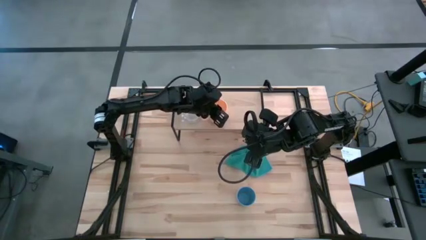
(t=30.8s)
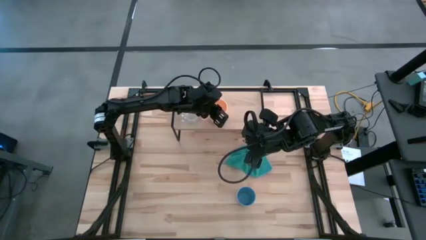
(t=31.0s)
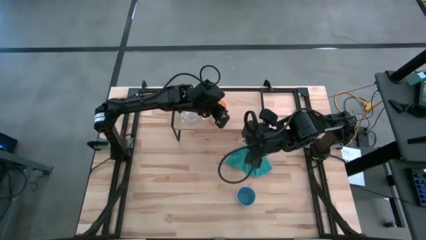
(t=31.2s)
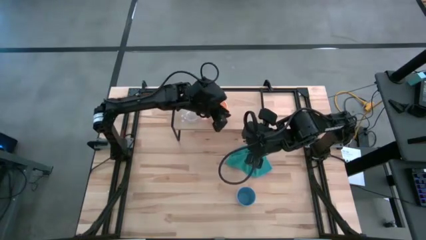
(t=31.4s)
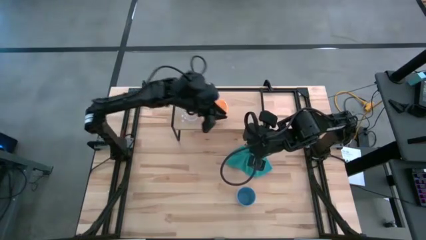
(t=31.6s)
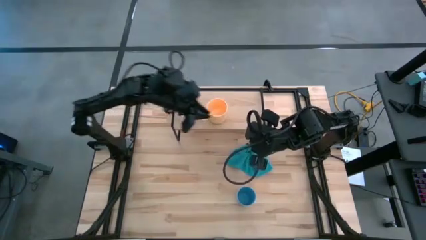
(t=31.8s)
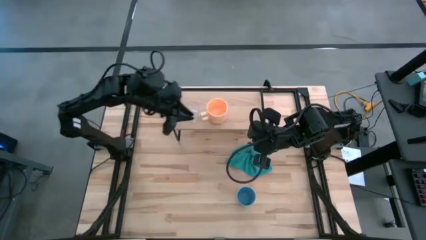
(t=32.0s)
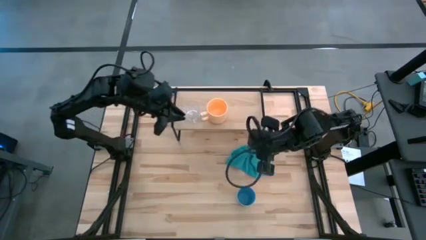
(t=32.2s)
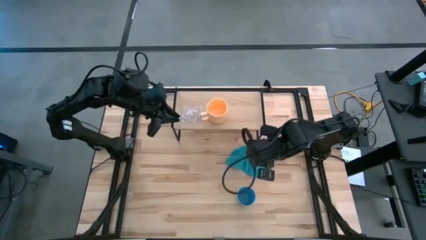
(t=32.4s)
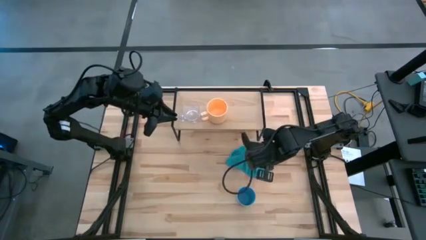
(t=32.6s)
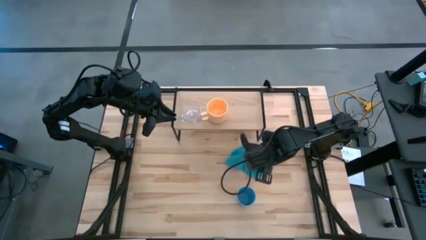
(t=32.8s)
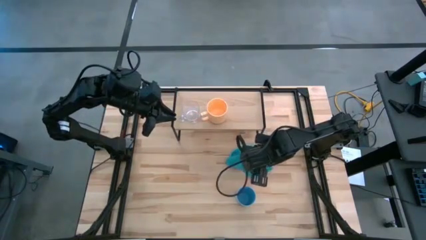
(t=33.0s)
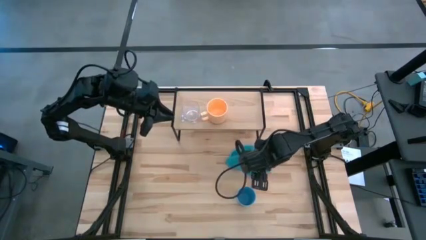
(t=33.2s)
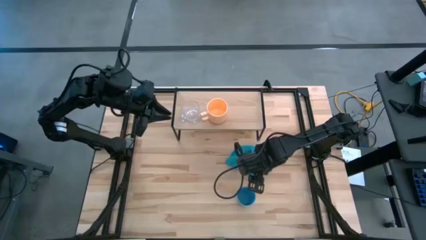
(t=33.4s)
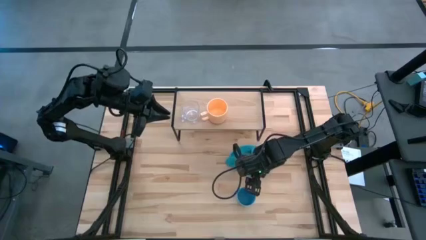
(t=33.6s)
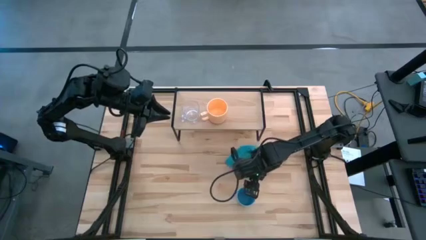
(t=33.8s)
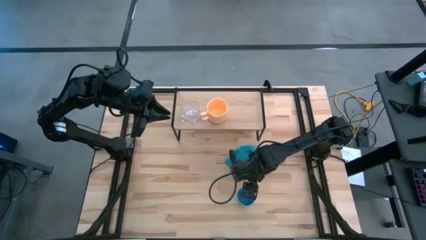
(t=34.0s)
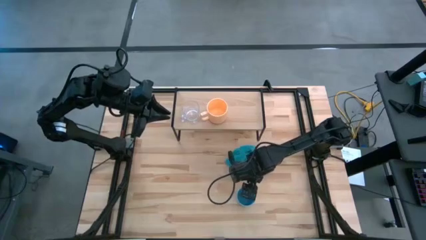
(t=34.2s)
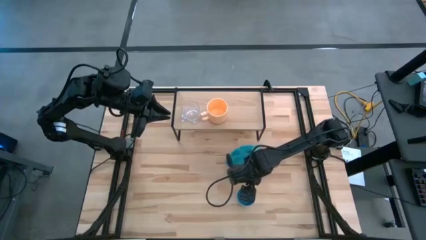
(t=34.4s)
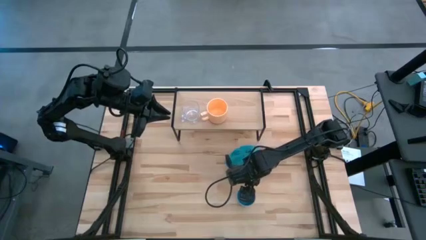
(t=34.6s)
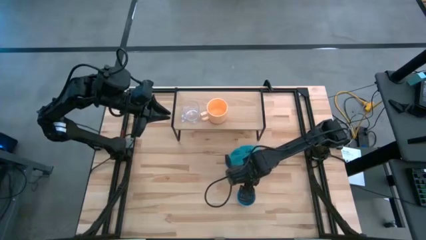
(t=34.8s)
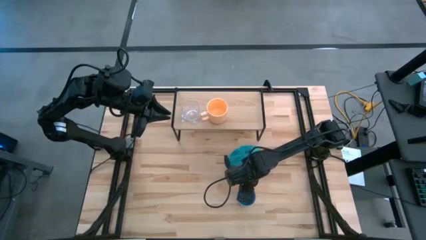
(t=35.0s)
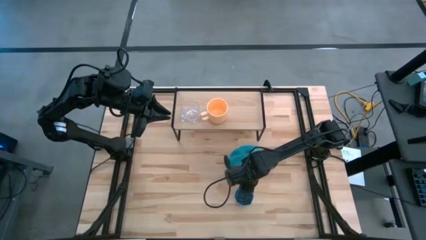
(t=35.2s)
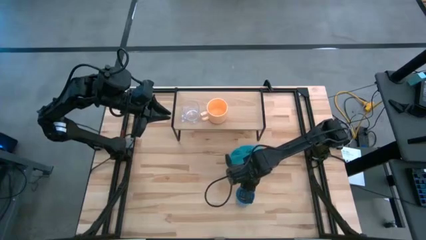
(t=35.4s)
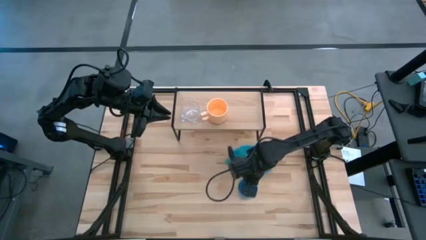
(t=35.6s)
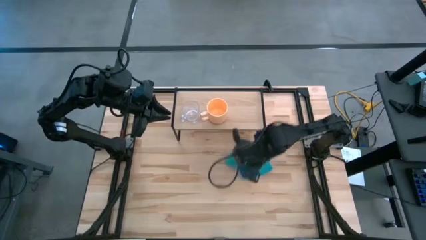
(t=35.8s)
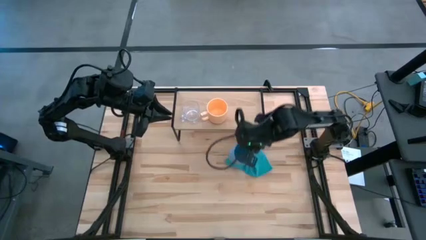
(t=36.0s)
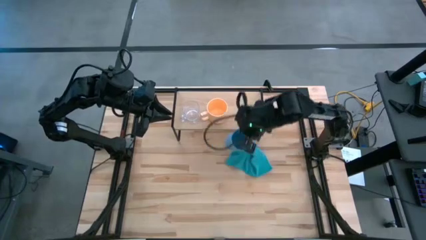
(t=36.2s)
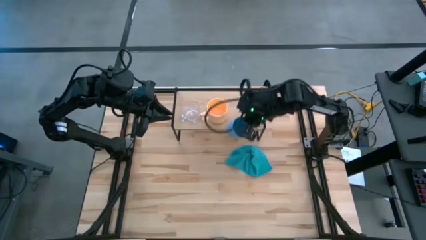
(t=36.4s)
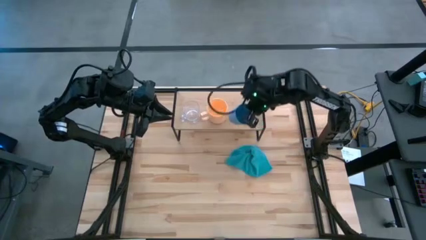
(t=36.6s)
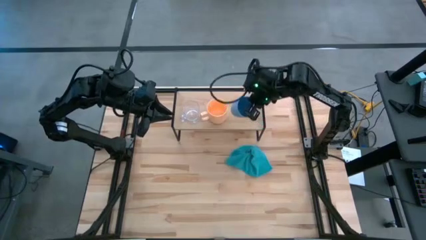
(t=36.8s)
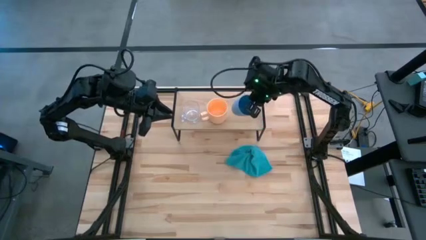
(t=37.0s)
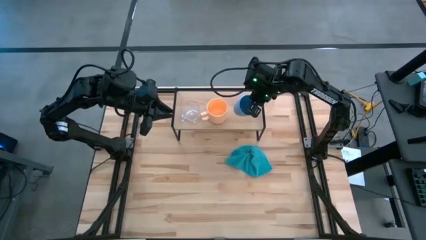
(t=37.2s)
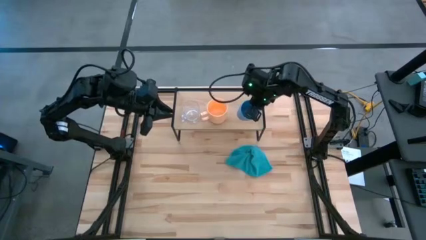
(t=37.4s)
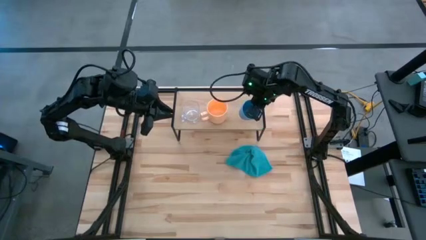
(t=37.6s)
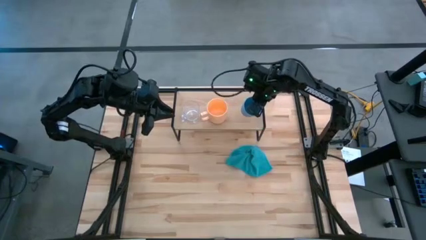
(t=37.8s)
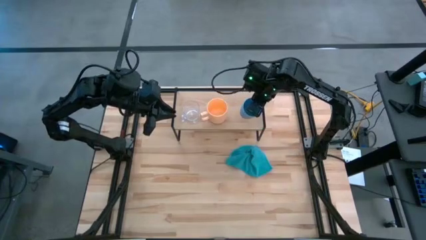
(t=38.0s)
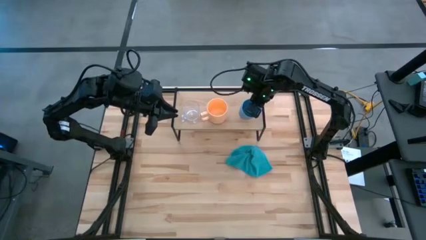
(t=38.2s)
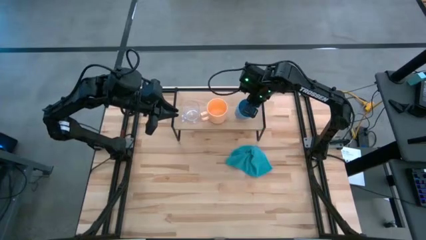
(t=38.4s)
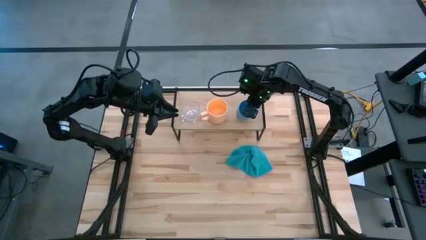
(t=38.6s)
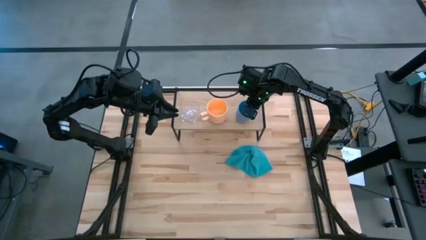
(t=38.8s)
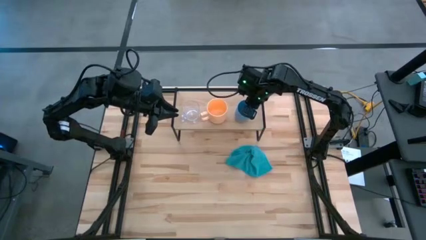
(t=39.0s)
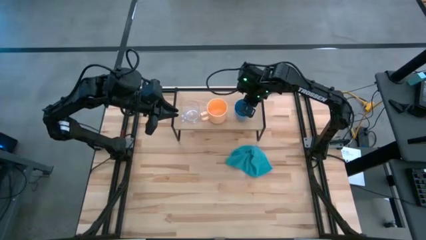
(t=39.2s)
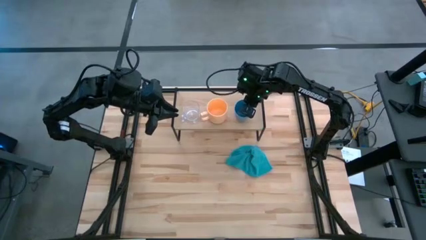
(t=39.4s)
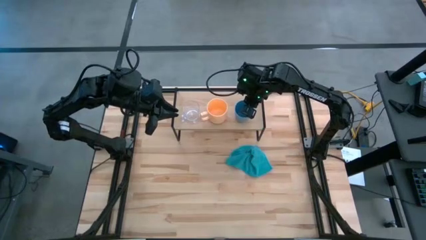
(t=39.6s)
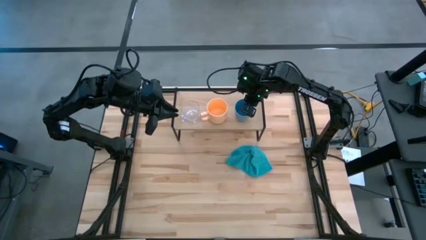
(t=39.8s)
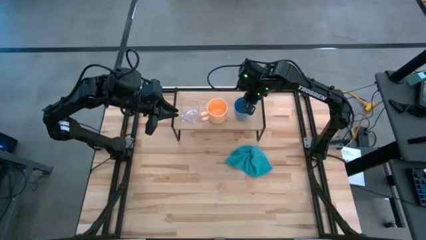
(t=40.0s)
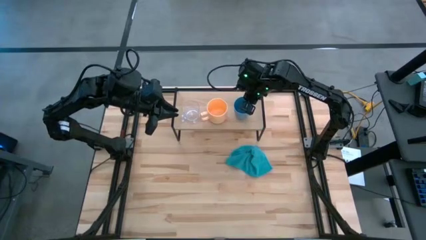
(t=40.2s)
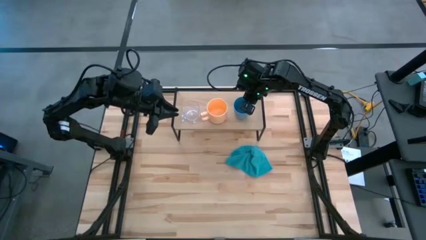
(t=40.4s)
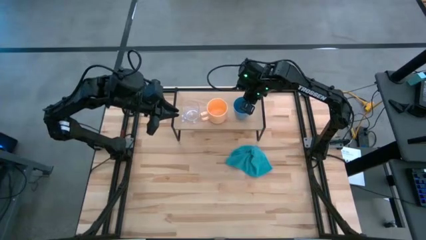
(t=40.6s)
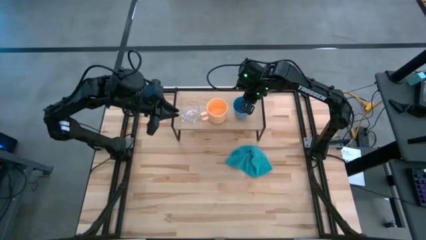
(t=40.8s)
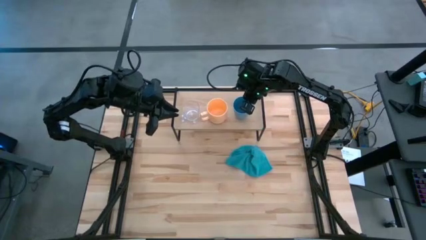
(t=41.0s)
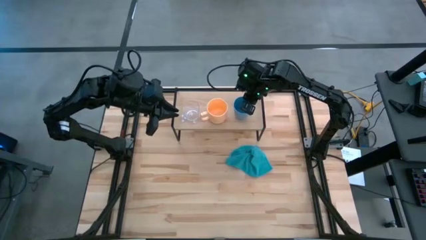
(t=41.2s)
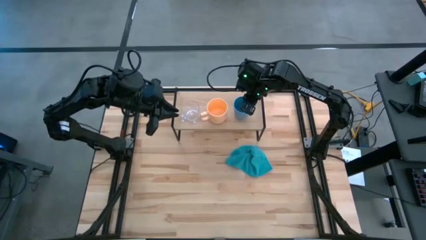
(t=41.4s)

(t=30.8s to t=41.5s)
Task: Stack small to large cups/mugs on shelf
Put the blue mug on the shelf
